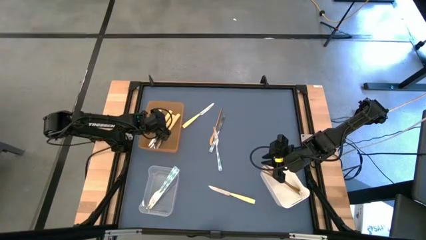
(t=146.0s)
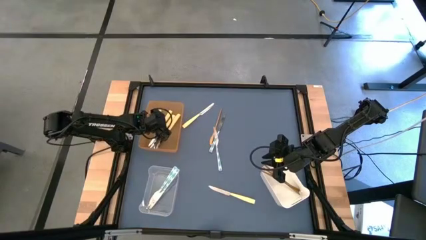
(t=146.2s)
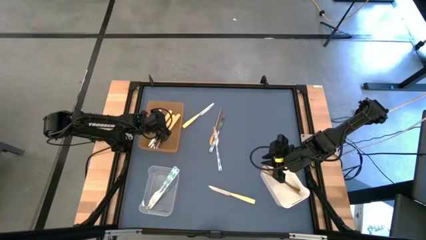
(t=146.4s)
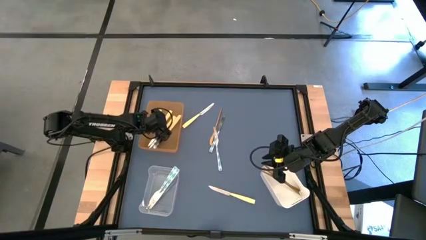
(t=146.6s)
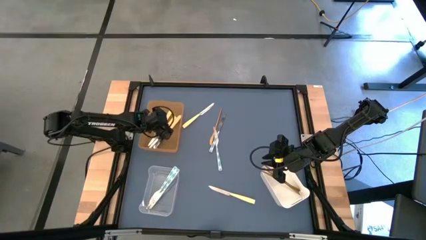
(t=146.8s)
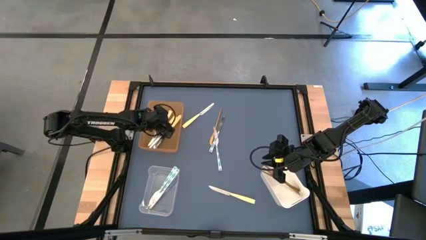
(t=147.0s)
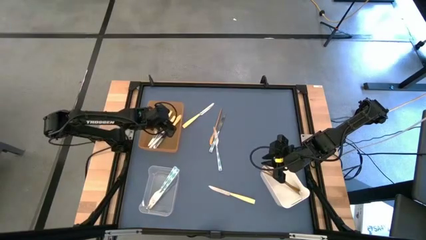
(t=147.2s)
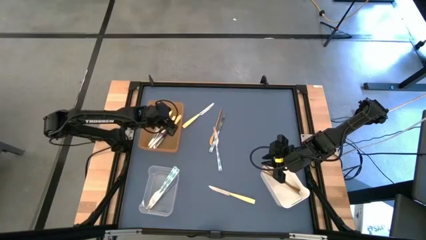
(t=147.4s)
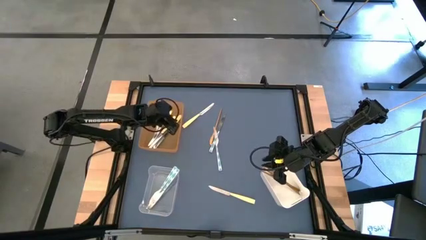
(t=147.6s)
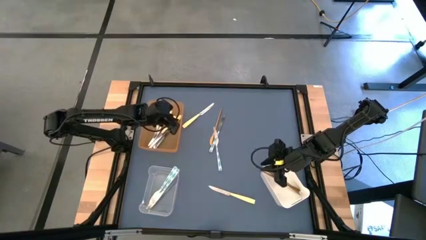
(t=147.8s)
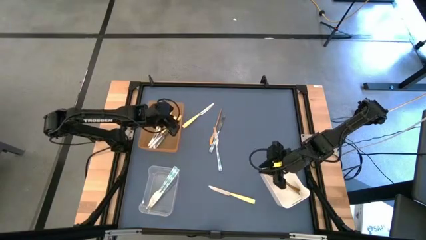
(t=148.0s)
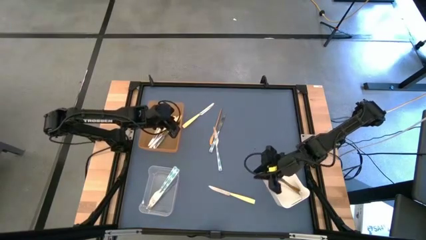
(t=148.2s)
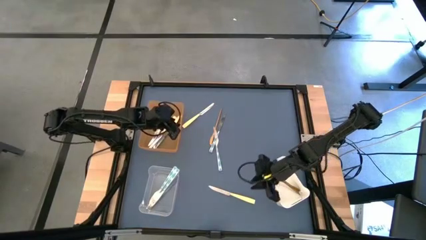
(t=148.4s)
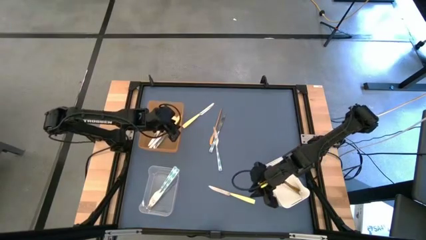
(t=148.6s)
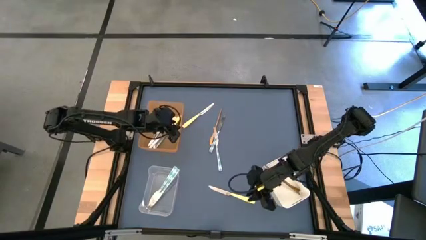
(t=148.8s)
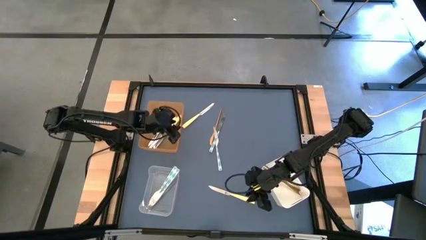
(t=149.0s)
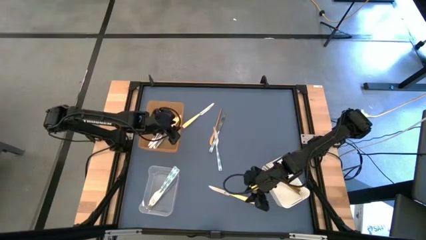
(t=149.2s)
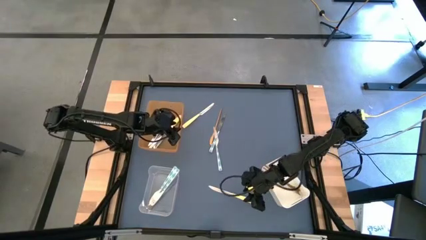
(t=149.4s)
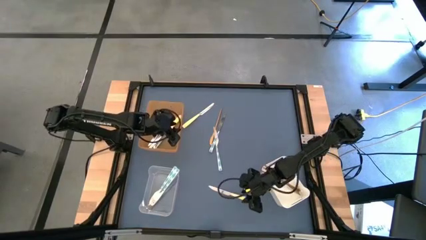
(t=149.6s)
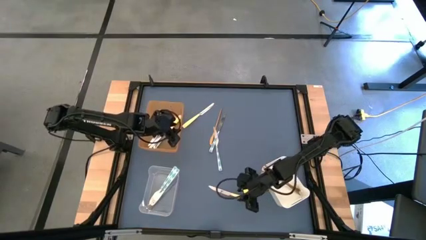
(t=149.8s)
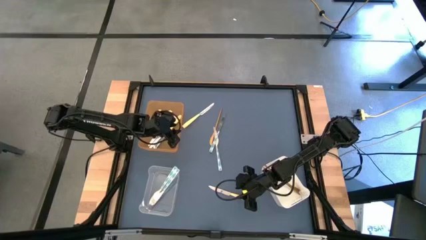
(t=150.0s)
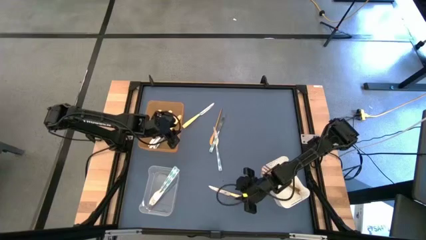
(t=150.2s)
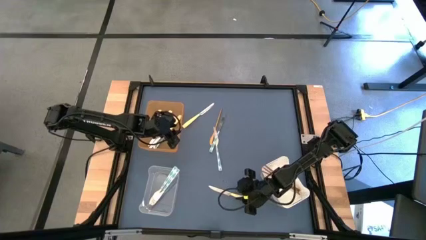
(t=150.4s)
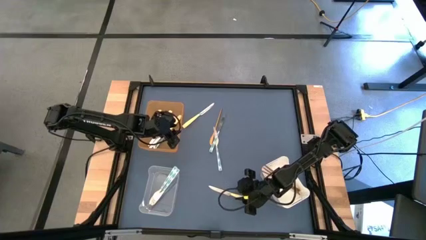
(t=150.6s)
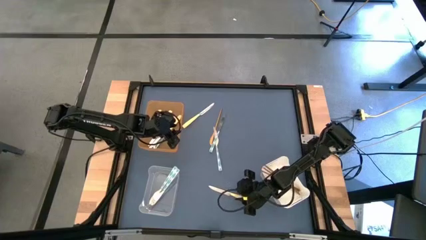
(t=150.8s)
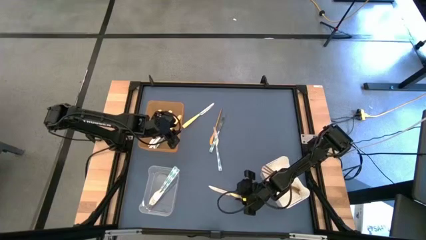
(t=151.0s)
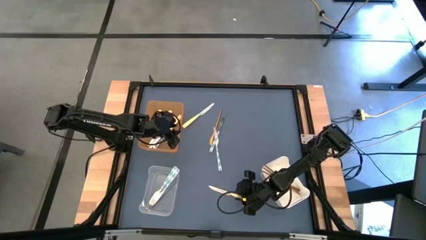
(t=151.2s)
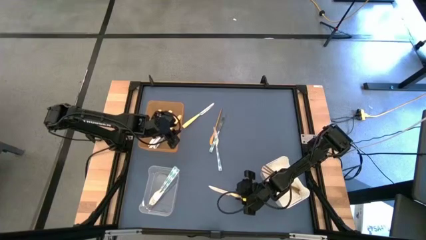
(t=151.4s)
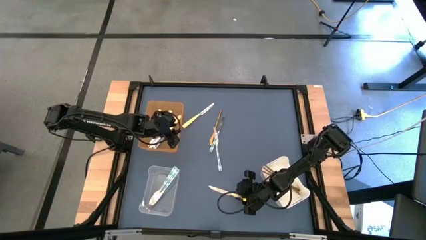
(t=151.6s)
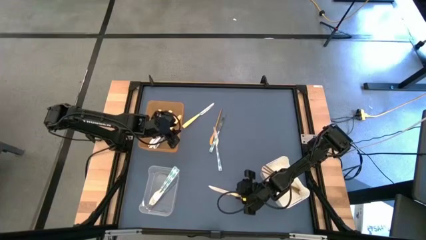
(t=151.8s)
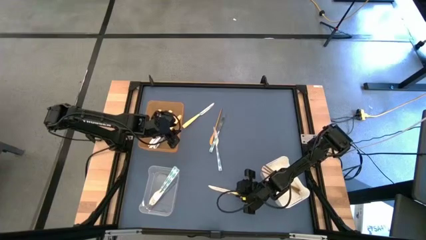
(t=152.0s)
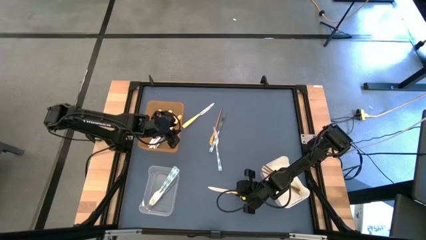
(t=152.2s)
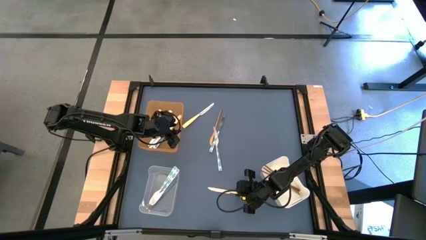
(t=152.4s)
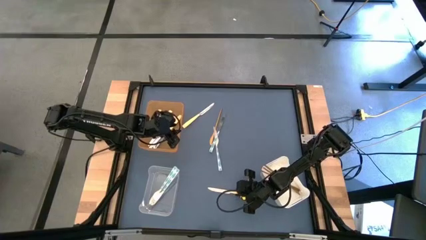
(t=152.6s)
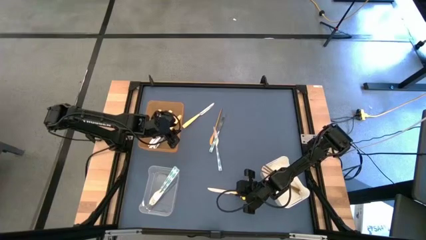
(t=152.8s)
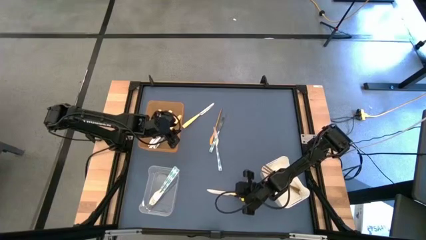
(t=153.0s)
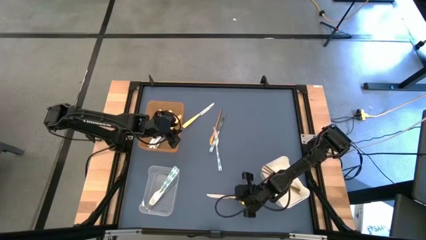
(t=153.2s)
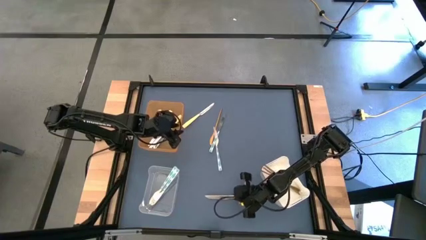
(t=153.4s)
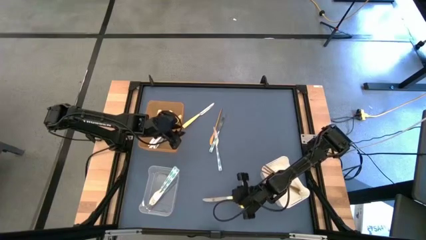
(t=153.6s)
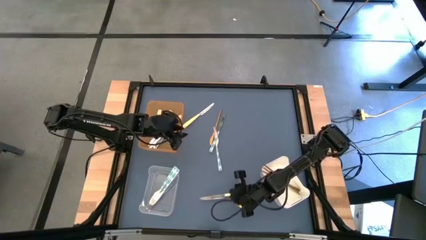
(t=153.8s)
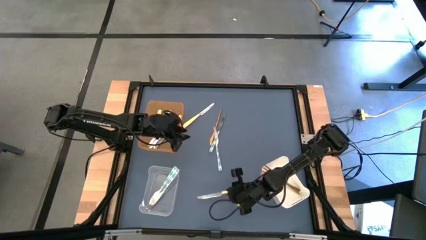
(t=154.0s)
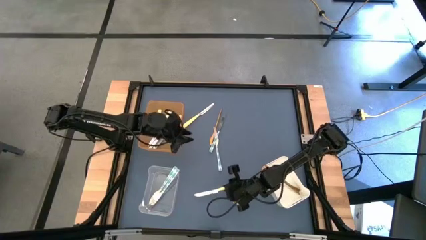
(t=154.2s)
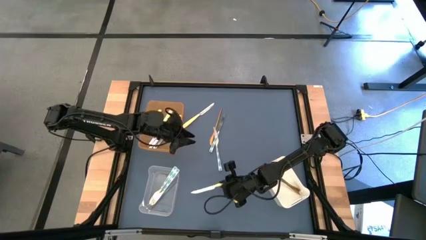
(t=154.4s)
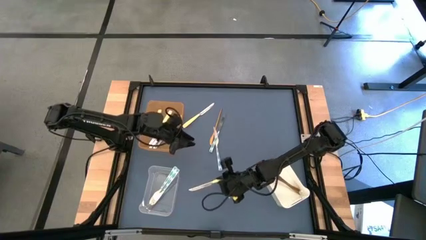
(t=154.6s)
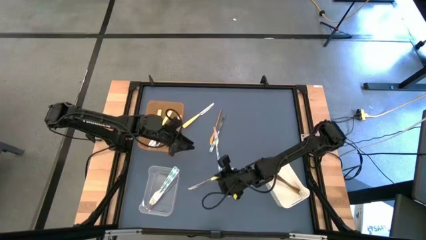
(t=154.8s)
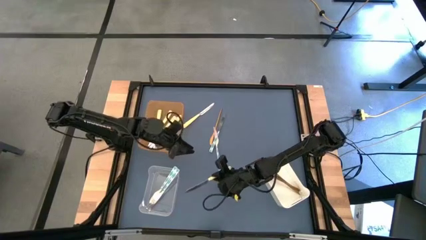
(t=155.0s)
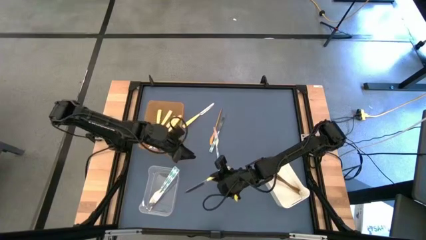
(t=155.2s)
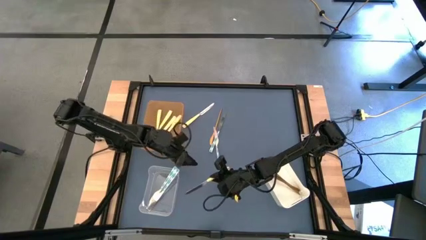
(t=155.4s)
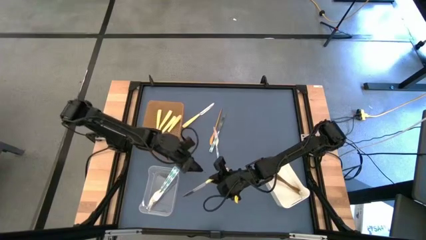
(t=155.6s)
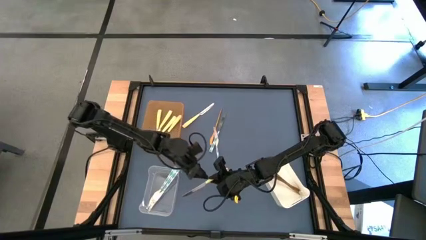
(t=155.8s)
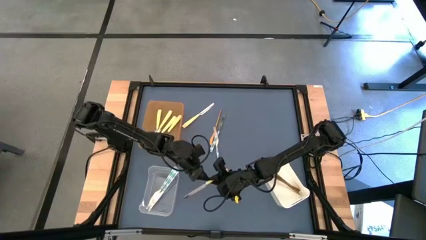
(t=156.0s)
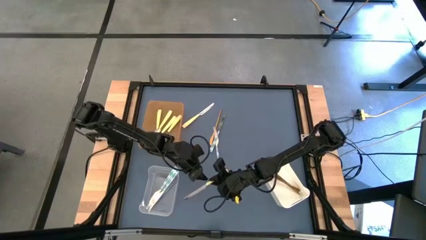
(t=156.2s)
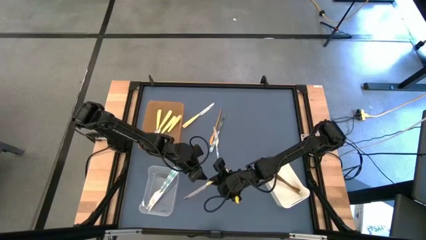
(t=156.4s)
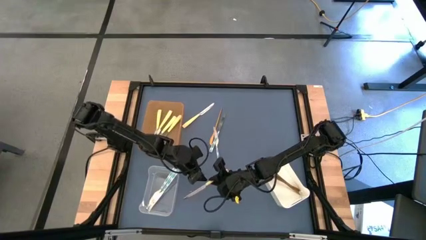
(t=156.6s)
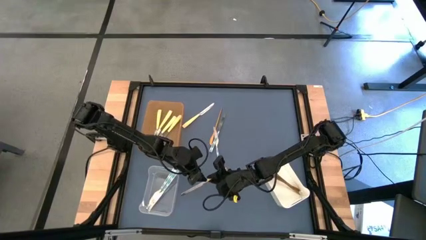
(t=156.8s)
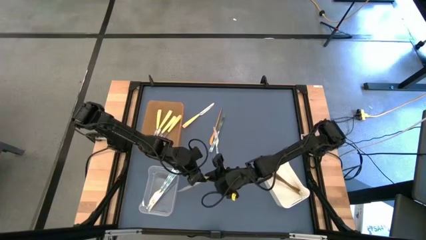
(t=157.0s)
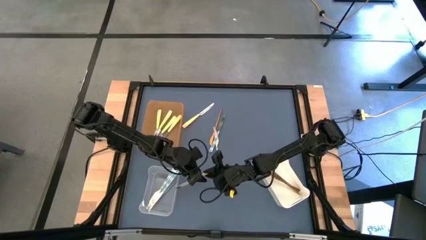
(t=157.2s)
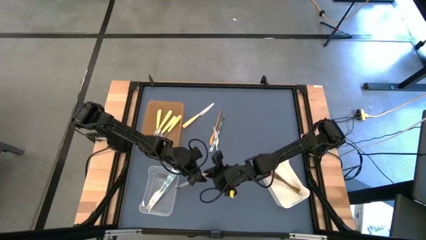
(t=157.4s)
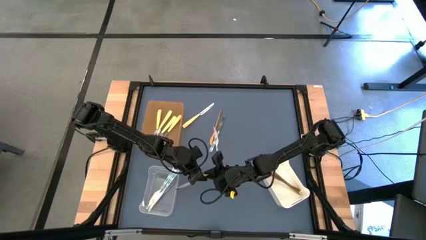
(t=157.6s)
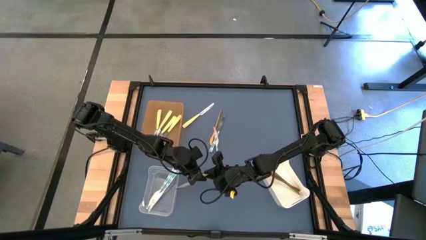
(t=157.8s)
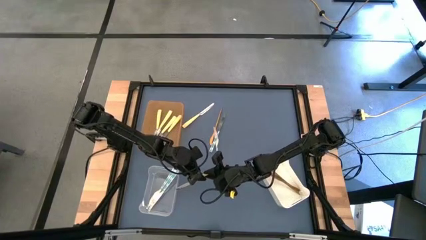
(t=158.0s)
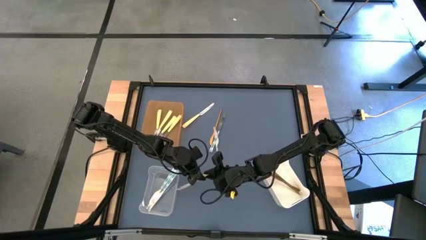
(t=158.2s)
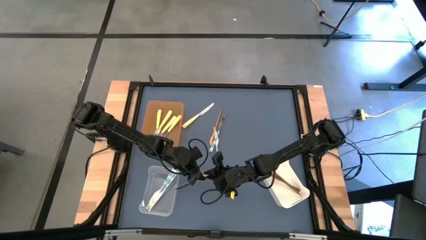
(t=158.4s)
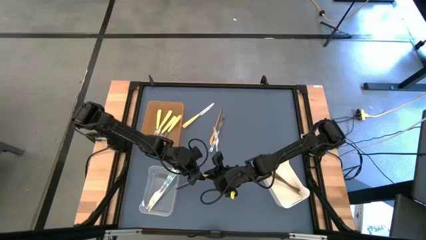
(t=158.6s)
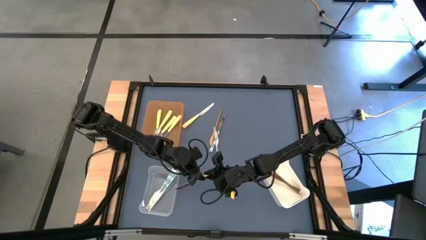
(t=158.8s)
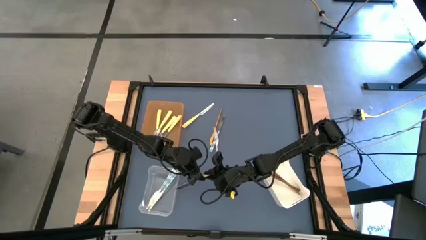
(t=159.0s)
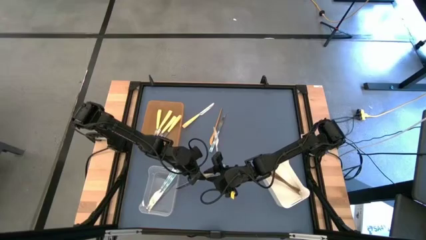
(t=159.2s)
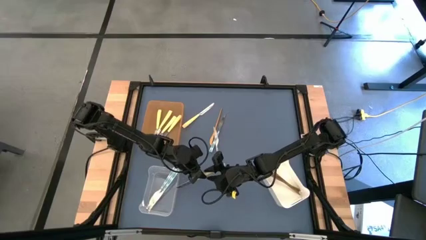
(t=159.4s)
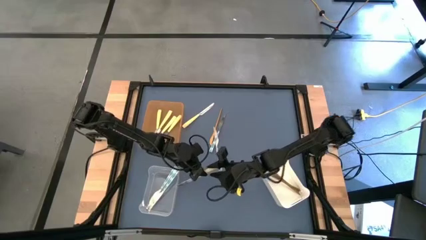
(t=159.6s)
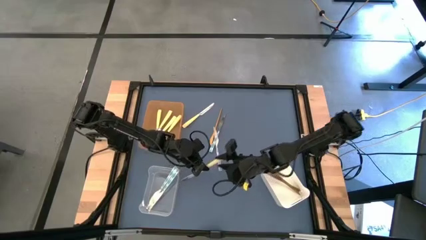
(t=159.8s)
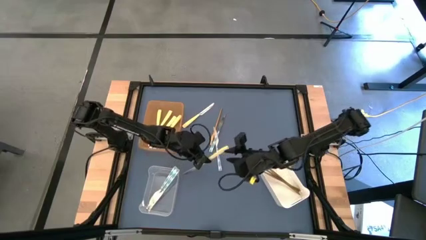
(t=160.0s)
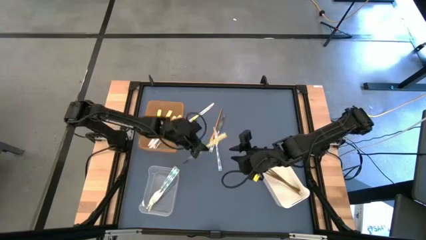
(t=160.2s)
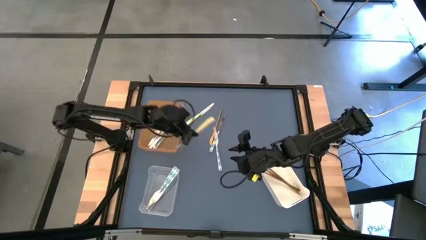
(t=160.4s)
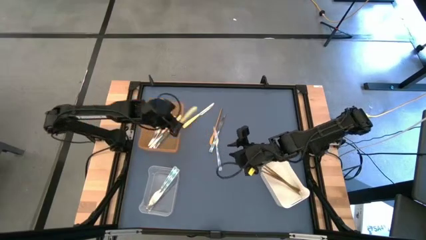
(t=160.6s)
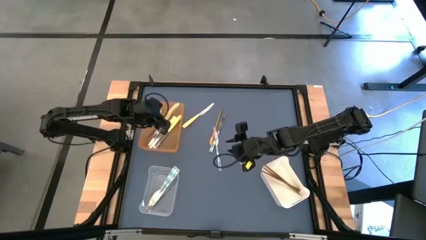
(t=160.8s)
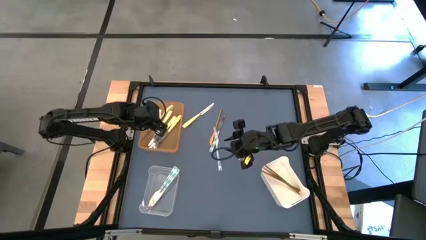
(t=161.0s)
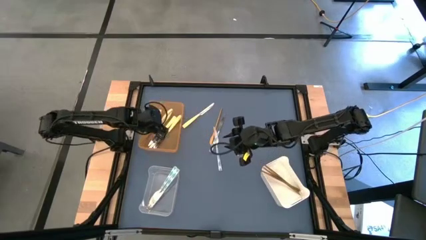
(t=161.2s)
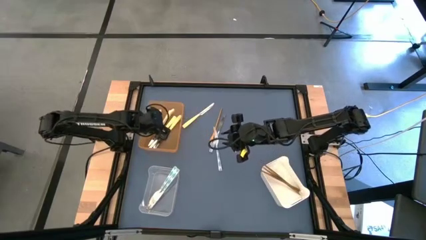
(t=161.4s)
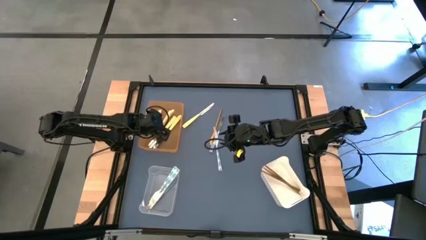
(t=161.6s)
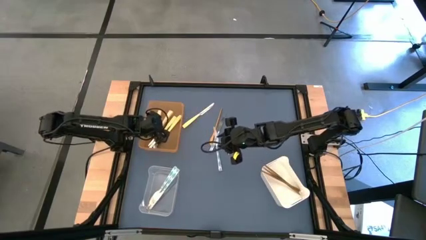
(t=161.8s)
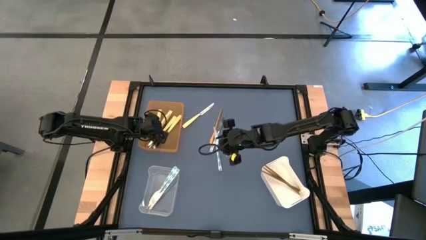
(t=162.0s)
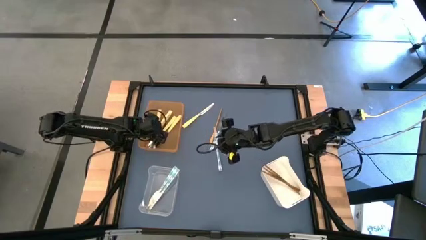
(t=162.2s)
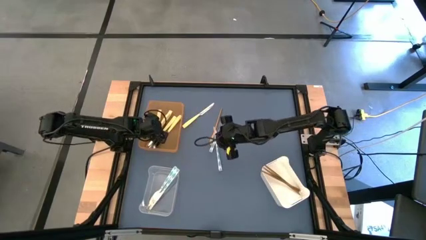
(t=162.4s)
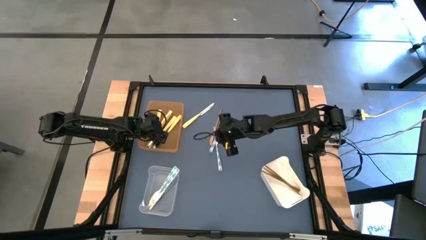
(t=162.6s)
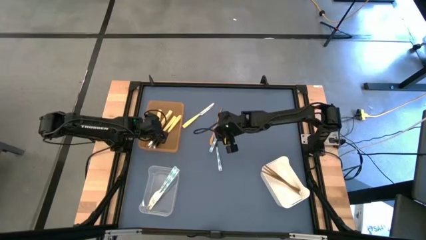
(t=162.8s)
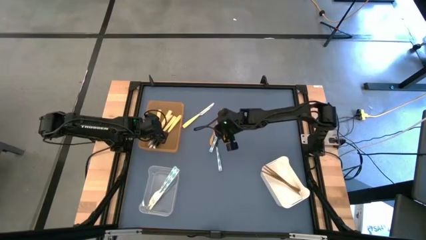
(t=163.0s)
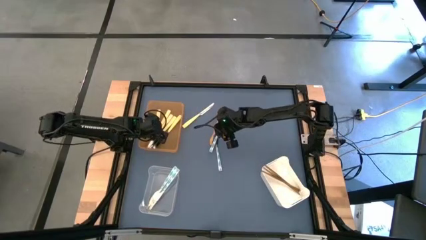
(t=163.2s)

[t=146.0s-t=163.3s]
Task: Sort silverware by color (type)
Put the yellow knife into the orange bin
